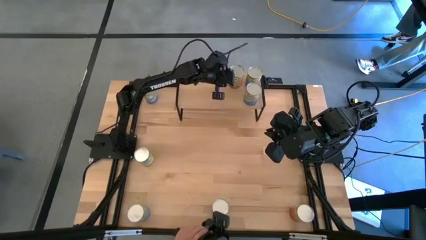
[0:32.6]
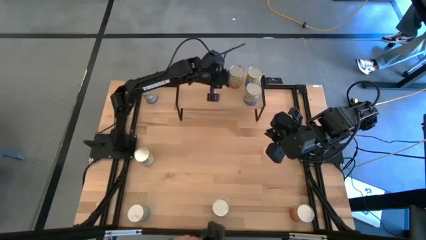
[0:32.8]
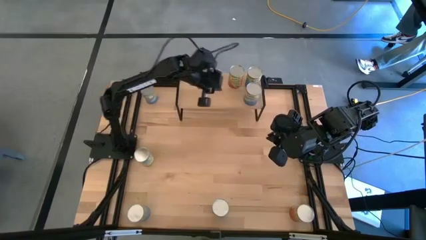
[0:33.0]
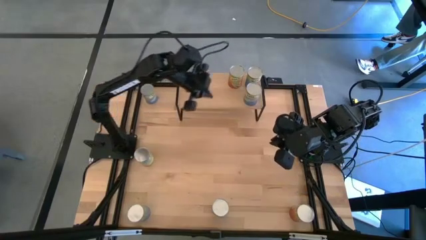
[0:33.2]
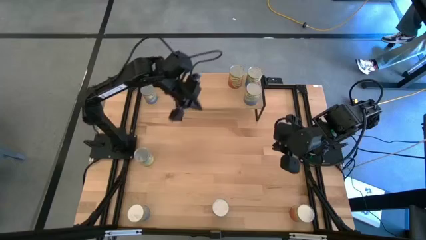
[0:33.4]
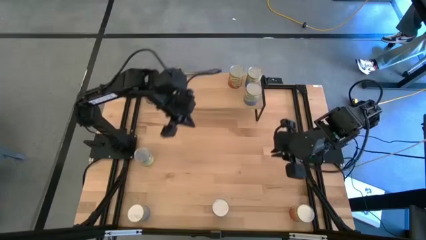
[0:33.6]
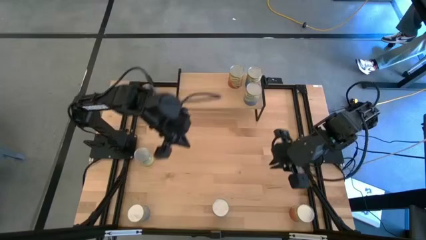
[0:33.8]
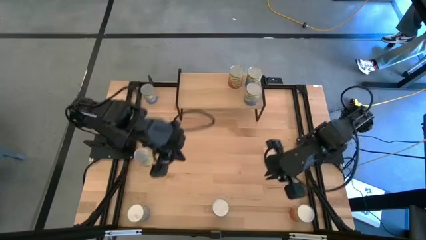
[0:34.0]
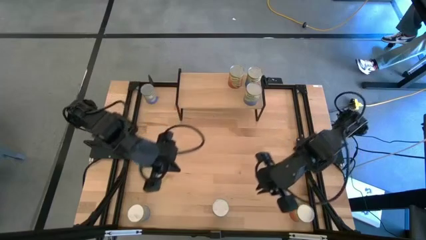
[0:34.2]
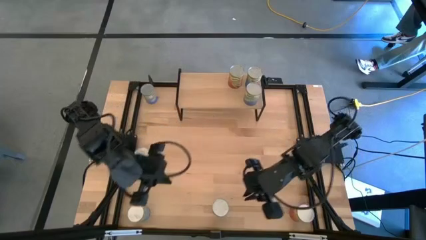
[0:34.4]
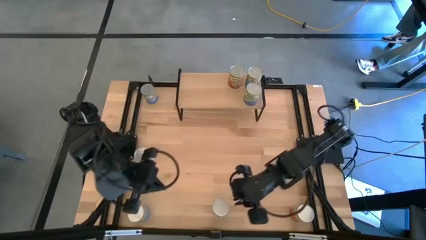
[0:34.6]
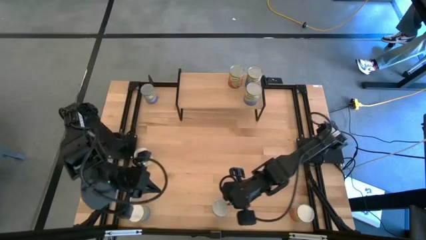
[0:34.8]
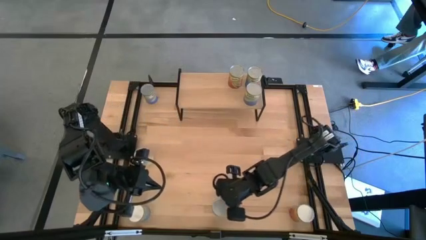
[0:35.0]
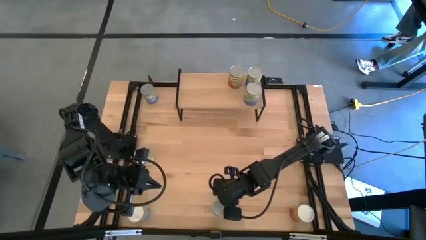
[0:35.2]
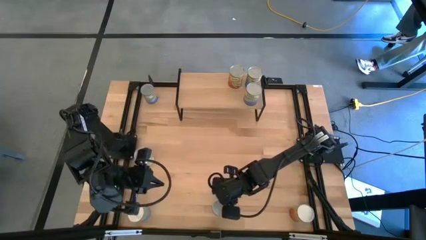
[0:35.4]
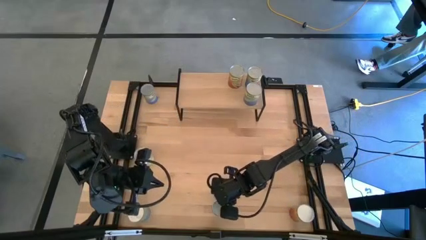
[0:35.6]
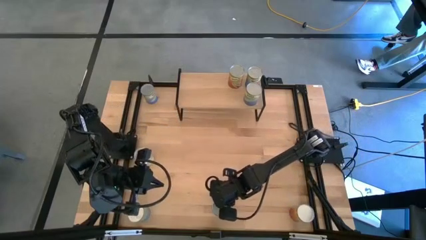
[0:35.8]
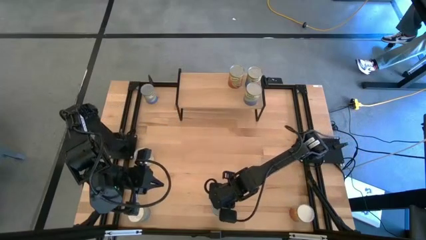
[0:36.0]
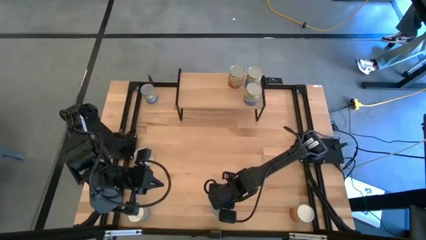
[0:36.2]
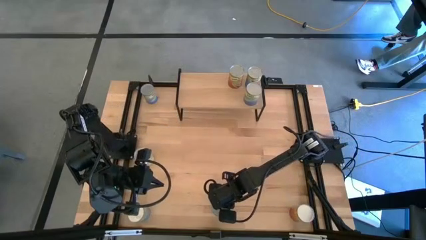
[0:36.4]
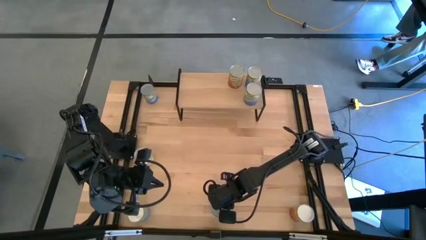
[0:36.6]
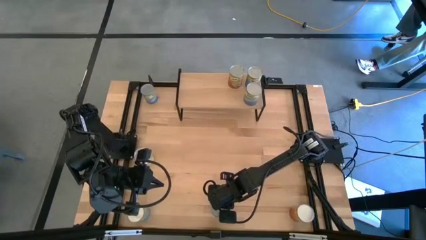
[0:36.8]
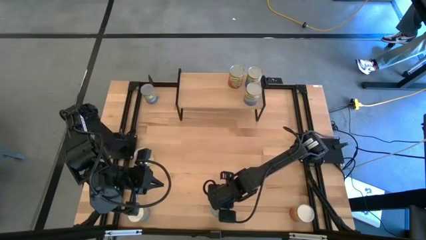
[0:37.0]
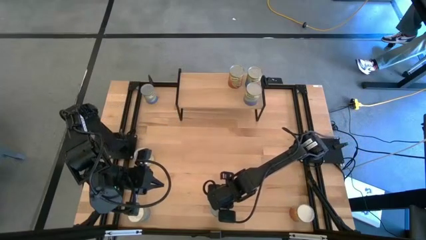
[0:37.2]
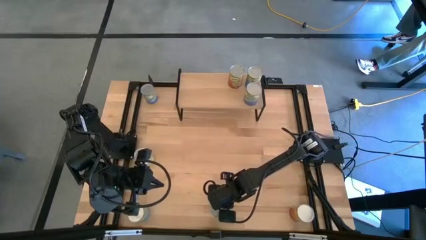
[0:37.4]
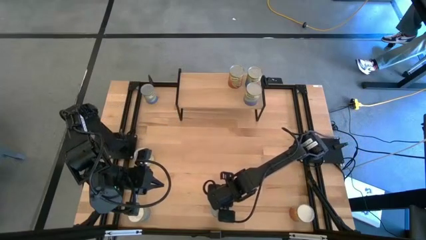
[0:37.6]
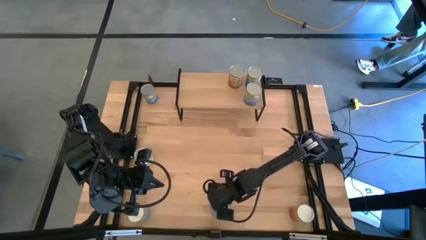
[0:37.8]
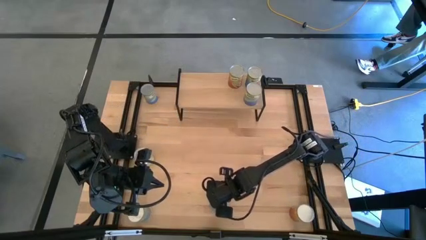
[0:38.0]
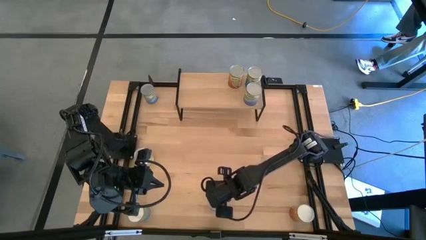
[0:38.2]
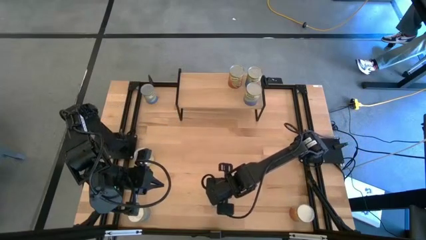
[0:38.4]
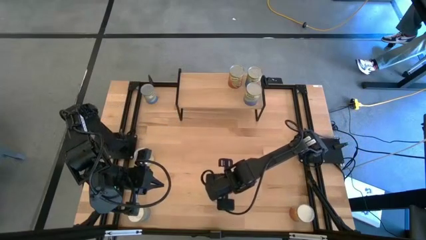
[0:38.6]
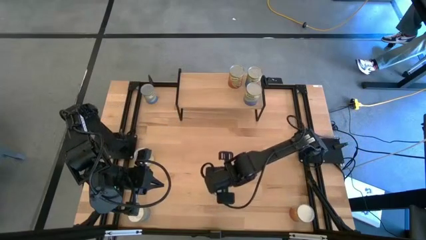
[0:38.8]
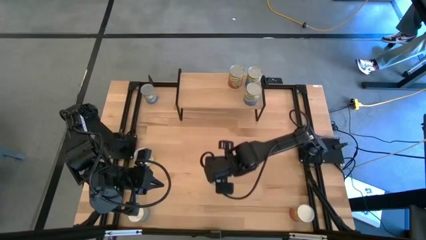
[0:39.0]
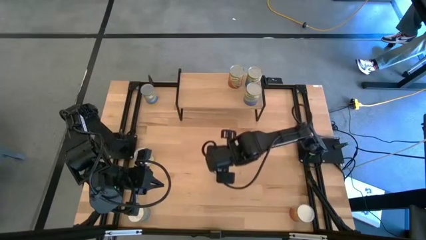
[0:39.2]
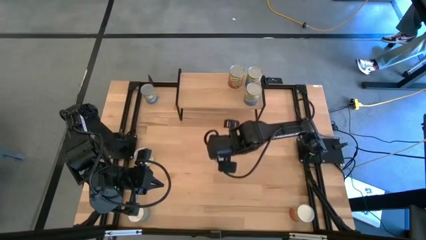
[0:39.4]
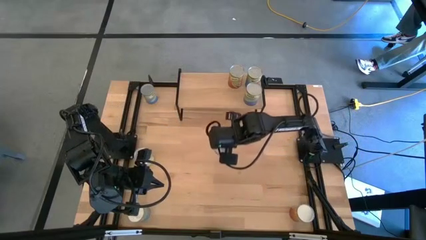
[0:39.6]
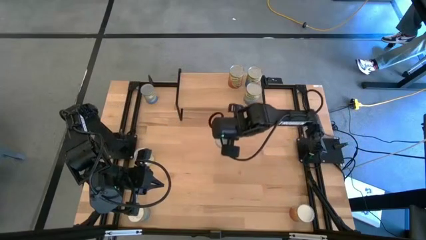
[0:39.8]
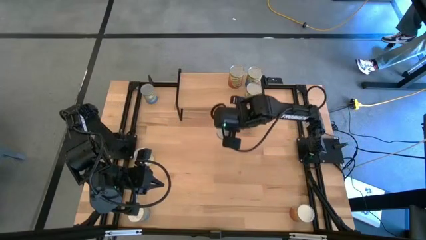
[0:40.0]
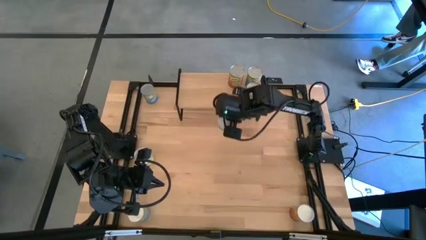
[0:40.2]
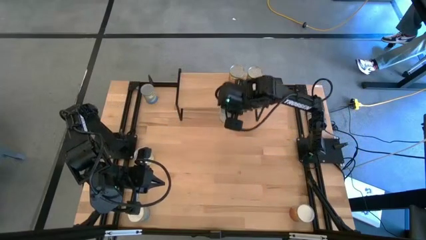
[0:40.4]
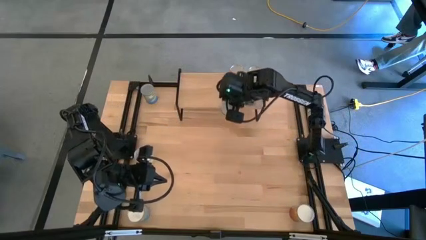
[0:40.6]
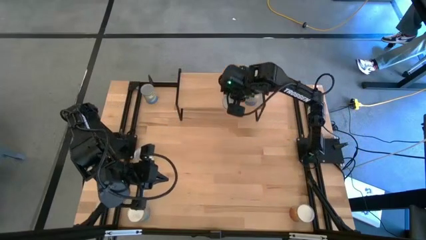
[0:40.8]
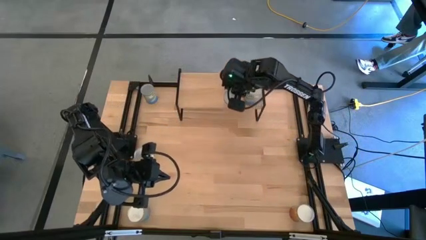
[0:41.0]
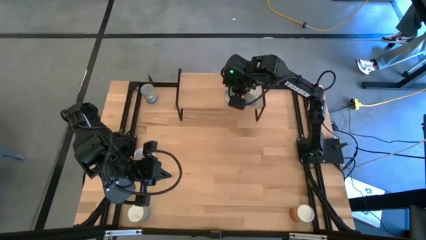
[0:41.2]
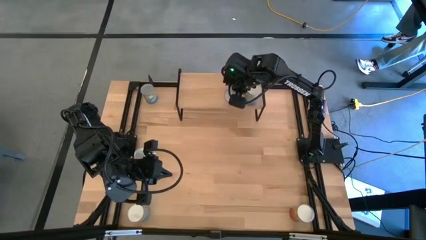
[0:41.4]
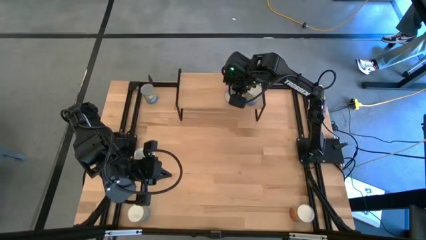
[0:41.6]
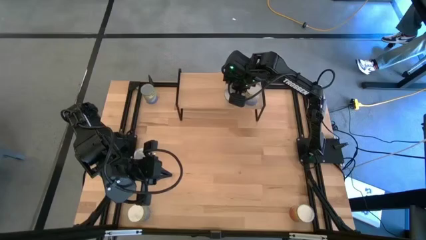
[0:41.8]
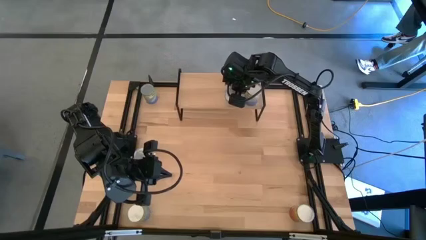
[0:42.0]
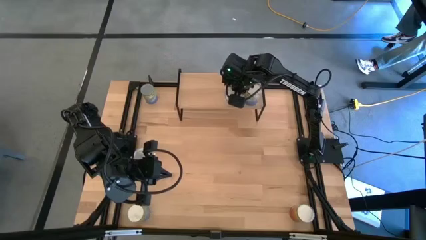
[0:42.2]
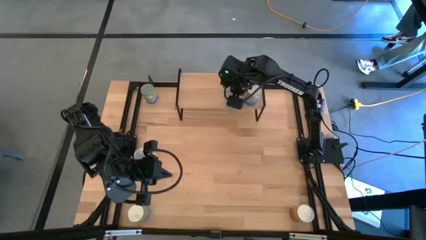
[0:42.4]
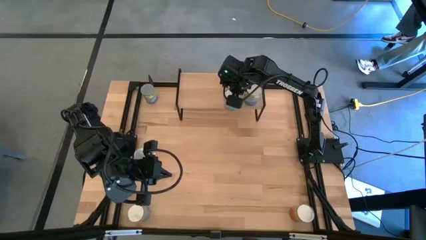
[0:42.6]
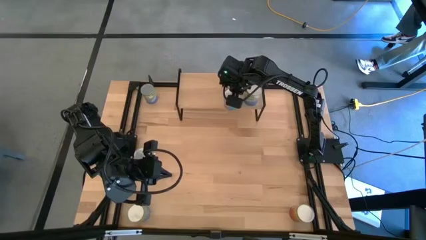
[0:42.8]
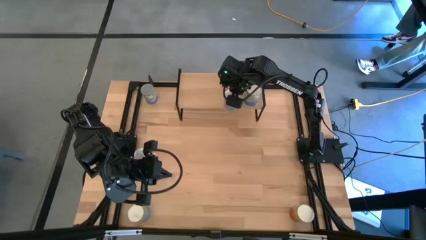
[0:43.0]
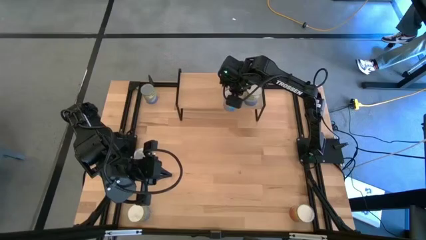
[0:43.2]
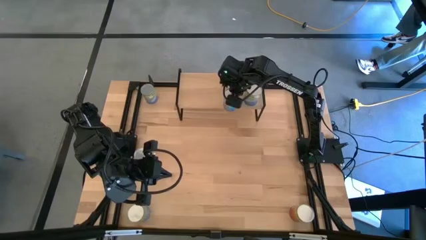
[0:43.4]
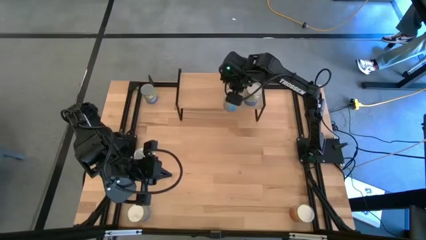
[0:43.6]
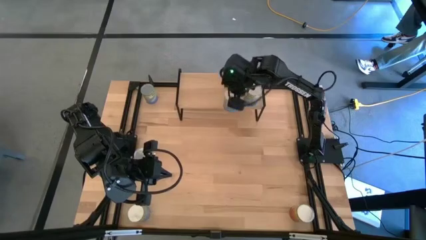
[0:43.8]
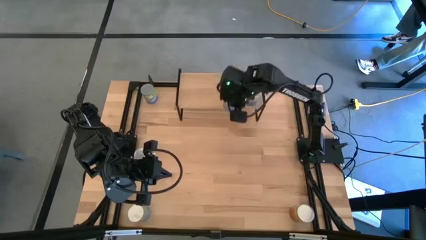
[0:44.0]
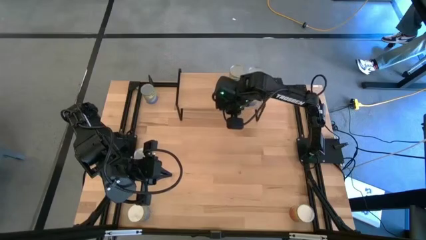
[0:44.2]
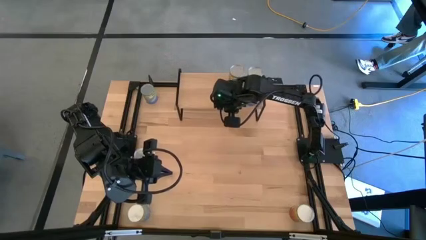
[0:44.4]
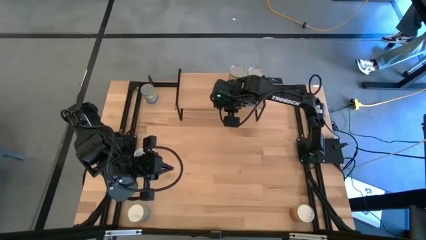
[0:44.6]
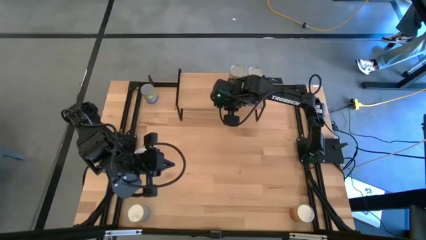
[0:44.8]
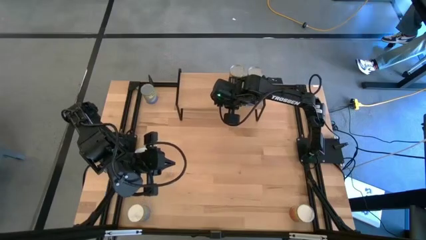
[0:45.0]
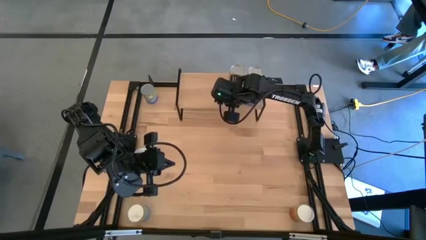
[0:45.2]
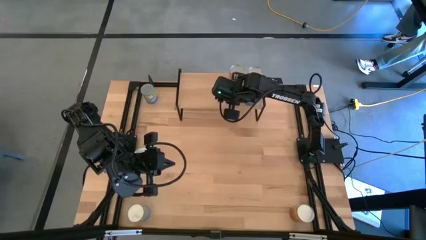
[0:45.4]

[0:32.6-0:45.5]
Task: Pick and place cans onto a shelf
Put the right canned cherries on the shelf
